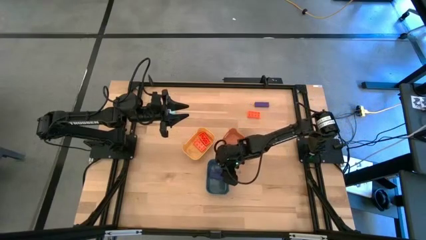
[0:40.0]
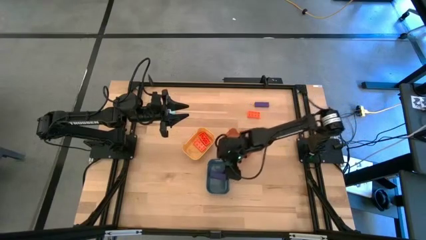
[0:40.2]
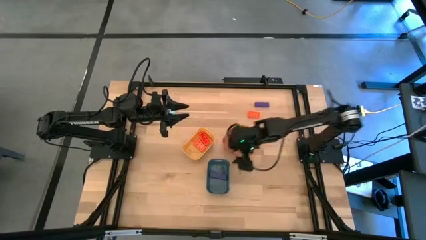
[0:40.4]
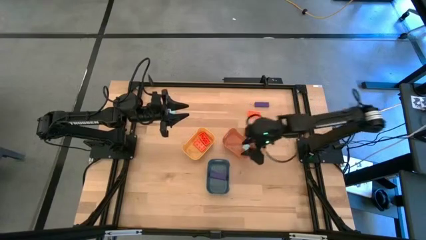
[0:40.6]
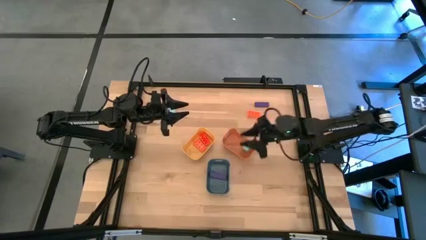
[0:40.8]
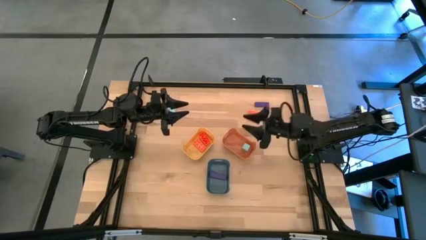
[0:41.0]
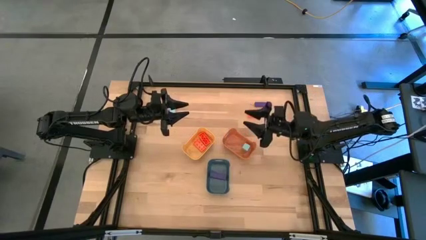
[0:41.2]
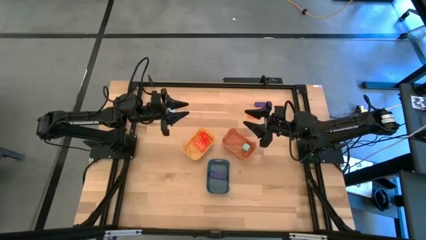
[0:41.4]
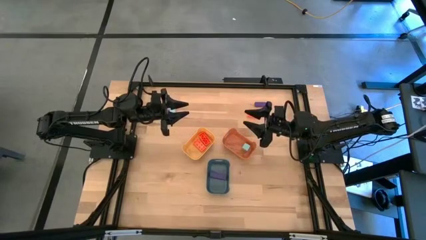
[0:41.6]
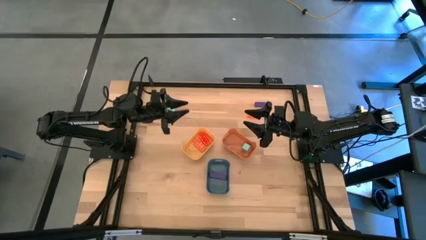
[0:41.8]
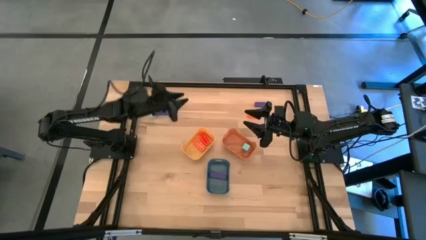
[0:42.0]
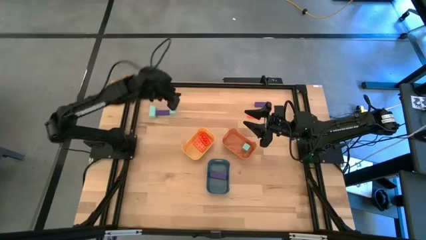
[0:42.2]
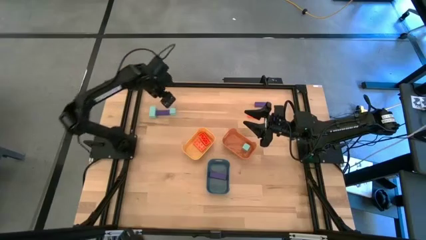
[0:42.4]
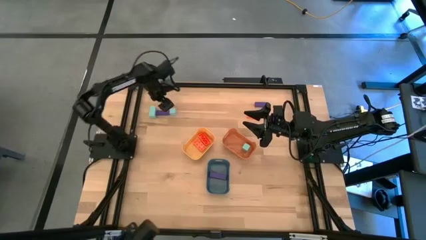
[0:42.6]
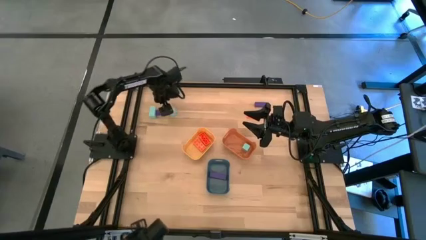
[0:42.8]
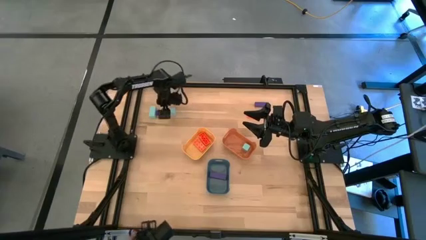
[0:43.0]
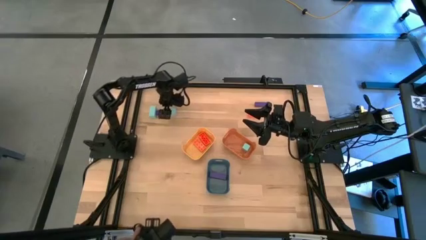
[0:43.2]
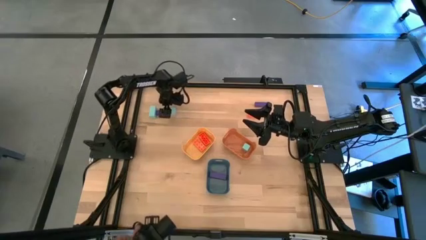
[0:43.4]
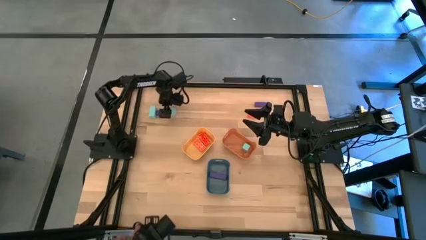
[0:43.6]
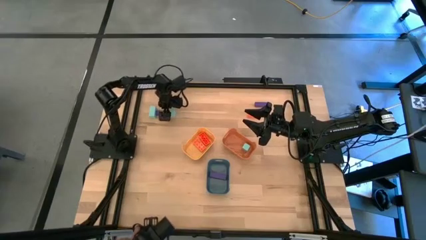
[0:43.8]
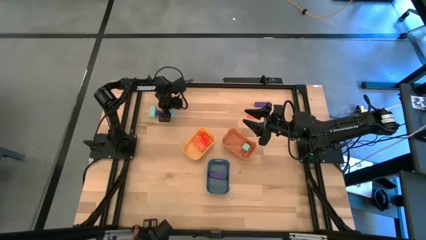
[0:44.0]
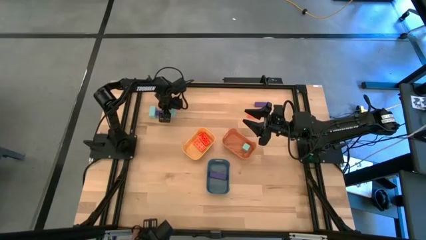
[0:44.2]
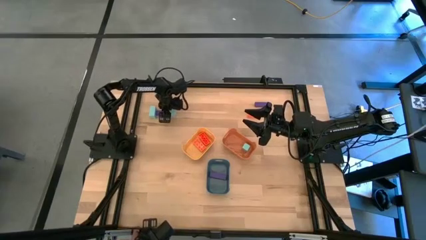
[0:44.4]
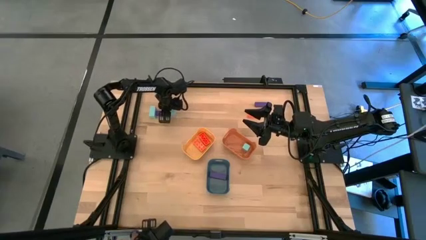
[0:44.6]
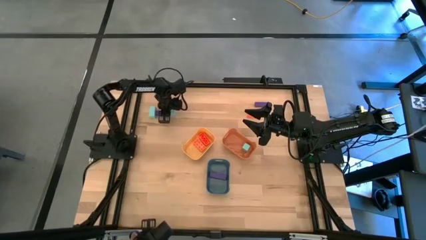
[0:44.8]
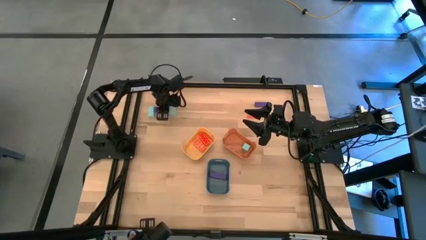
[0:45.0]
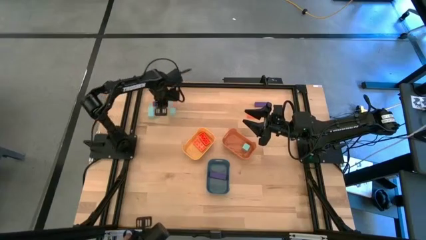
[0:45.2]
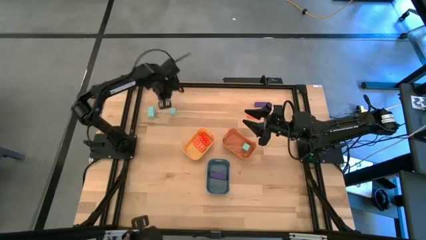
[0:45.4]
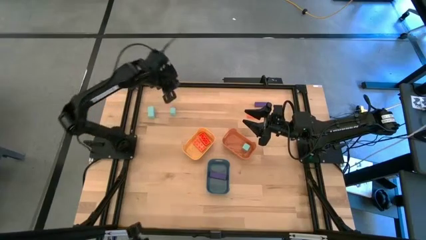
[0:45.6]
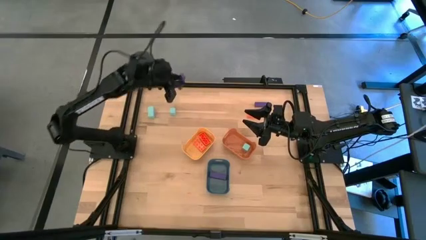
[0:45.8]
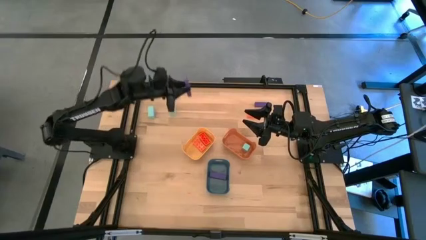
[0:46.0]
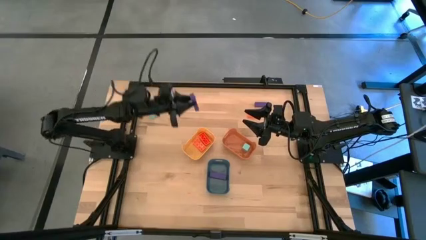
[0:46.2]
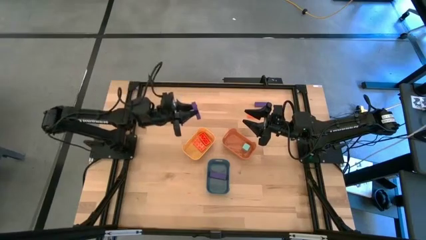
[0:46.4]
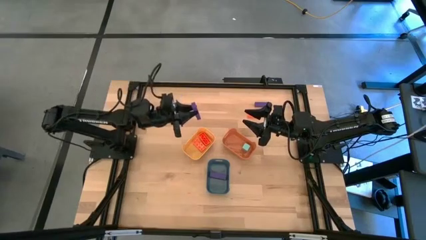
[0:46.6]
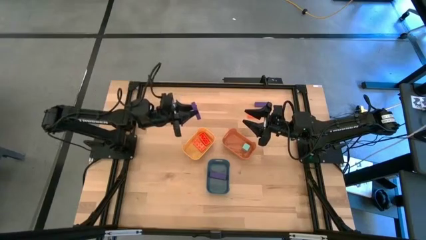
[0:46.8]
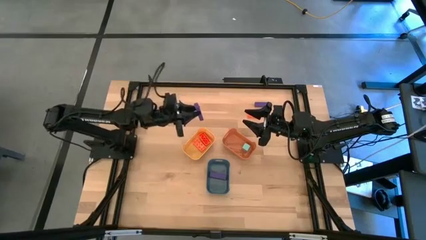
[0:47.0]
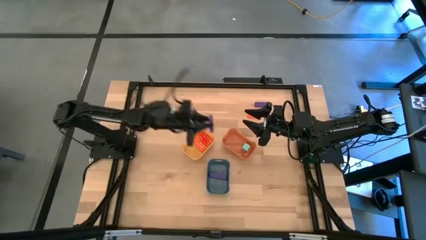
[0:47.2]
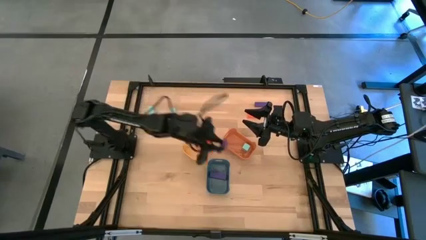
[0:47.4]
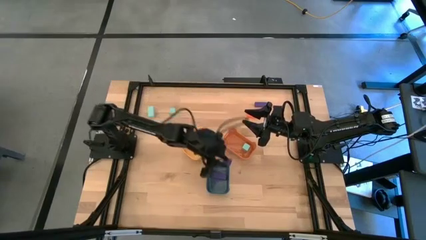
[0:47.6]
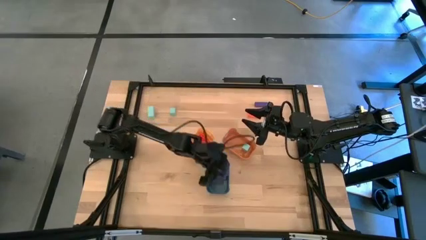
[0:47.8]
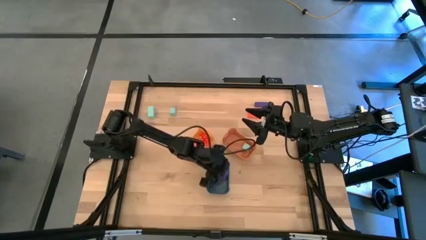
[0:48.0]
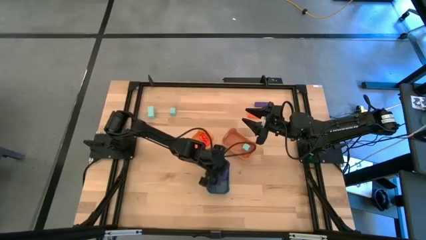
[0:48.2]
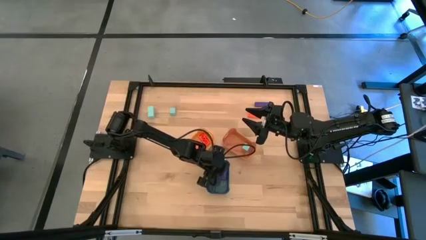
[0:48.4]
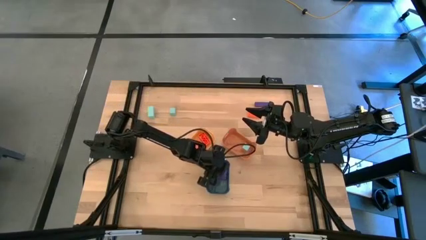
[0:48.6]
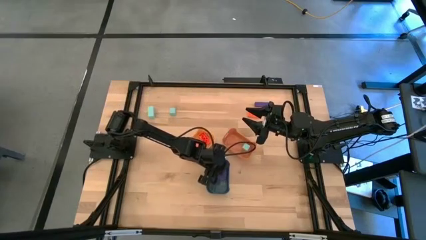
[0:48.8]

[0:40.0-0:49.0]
Task: Sort & place blocks by color
Put the left violet block into the blue bin

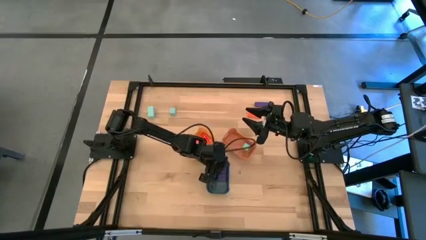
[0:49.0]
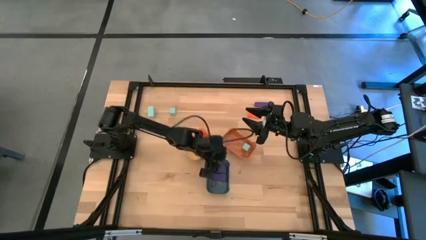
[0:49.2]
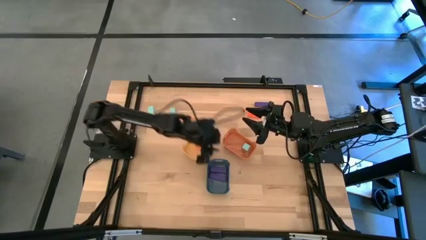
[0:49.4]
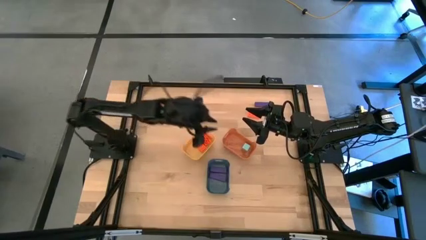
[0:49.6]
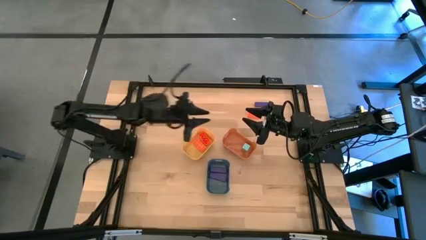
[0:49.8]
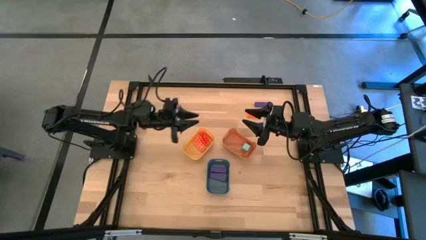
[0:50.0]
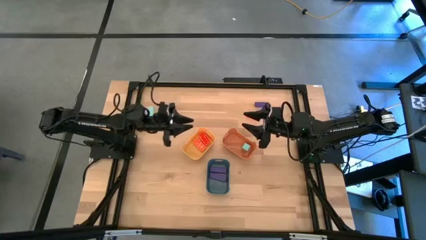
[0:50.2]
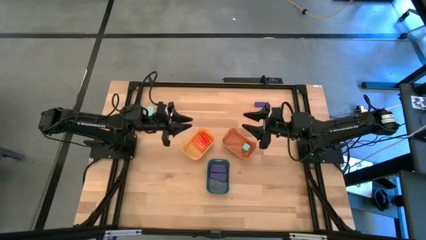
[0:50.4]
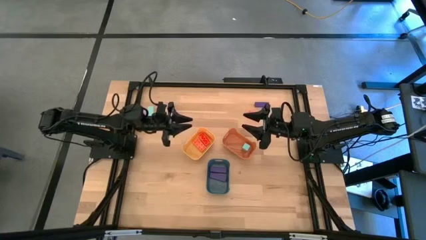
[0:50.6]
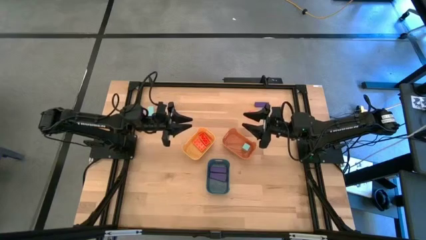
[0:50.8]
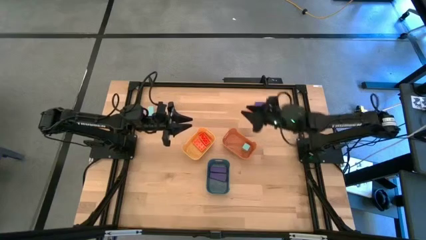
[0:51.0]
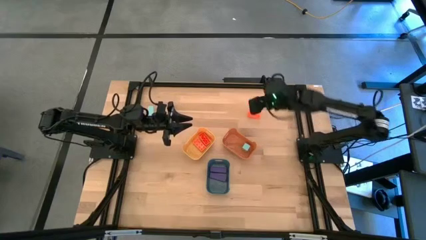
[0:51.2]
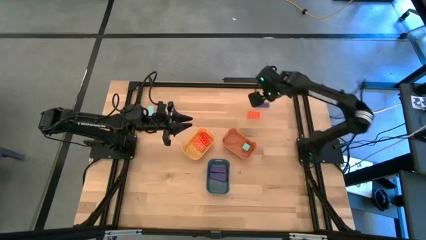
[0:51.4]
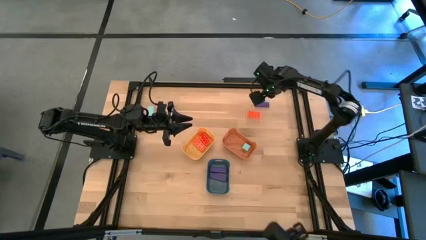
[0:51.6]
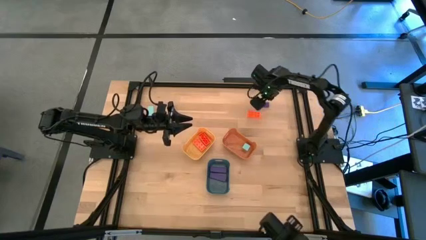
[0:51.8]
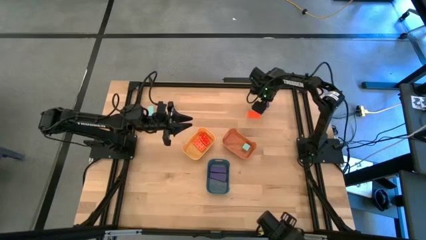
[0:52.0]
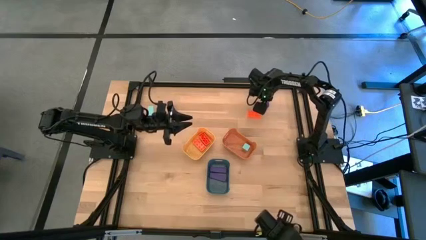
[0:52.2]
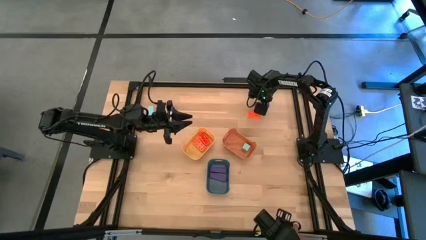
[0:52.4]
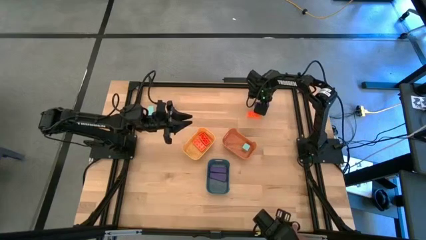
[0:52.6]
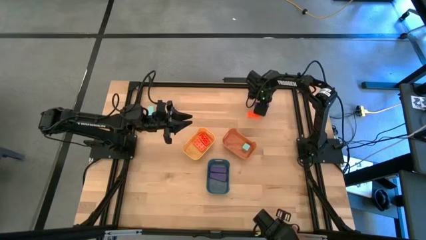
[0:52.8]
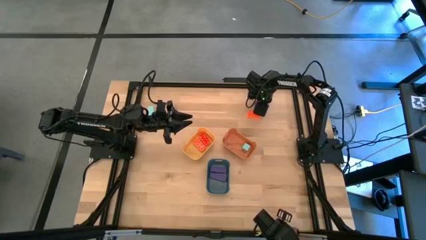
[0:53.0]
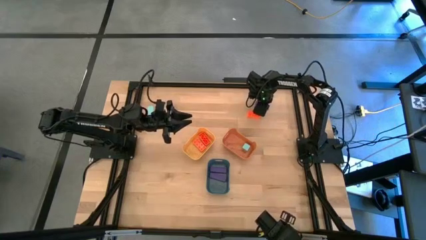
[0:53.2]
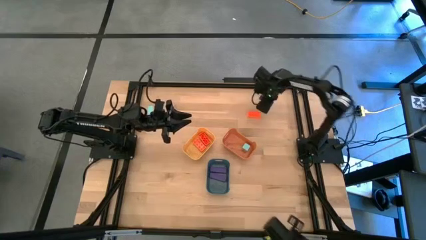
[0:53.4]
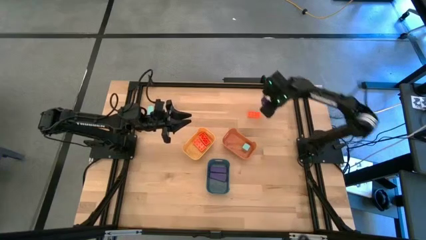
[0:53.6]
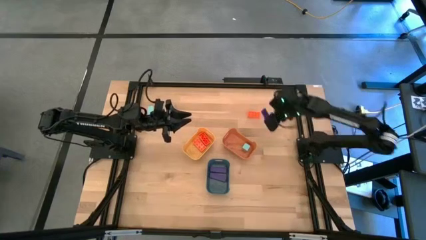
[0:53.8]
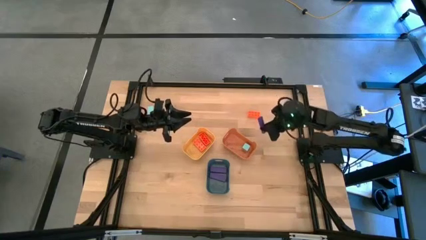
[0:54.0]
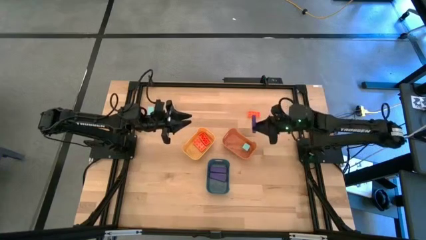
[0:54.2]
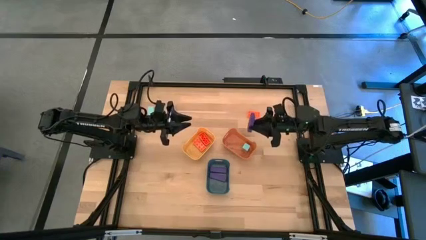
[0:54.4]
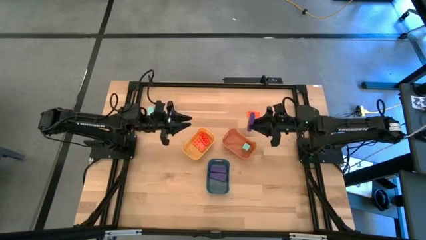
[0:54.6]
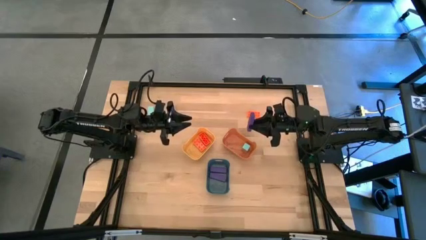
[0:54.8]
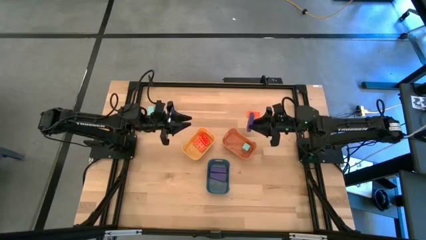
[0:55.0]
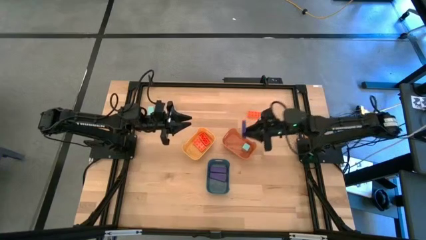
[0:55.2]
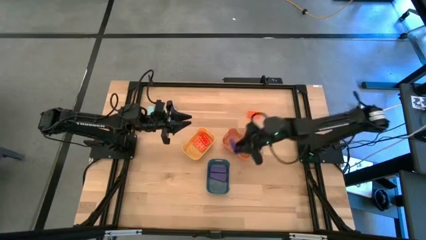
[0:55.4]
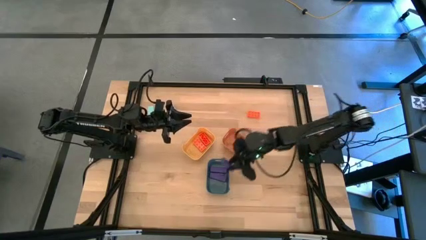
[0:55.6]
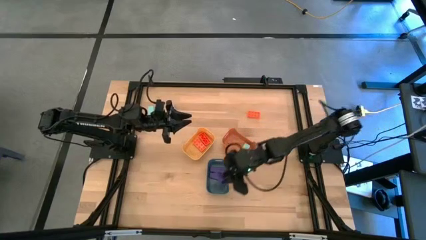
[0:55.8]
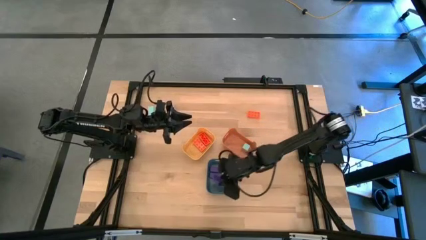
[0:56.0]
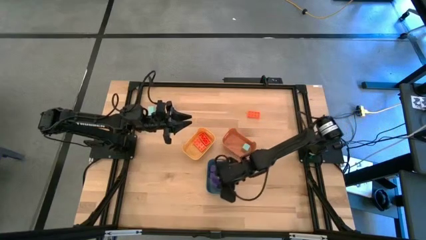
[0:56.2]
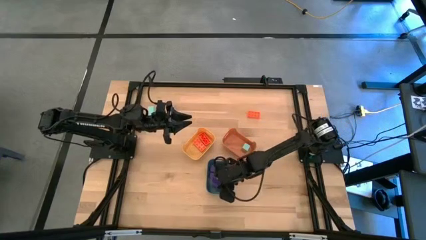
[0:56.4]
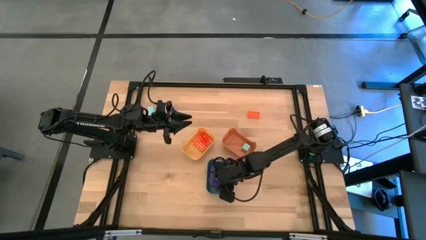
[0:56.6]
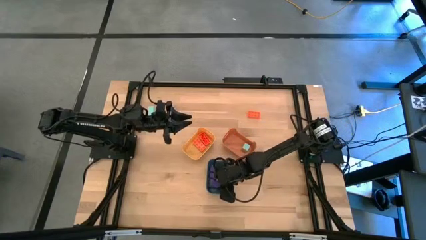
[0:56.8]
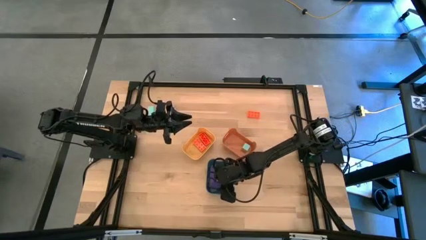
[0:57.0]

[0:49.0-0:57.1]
Put the violet block into the blue bin
